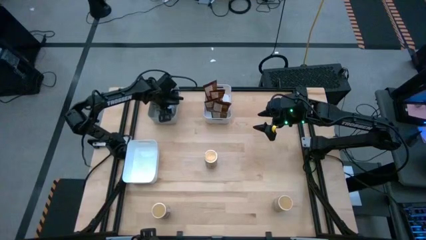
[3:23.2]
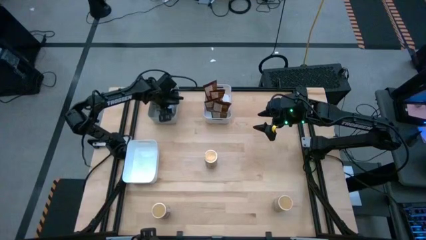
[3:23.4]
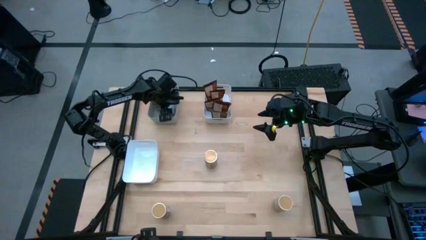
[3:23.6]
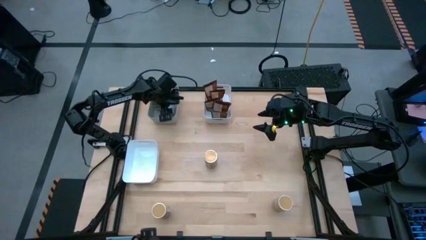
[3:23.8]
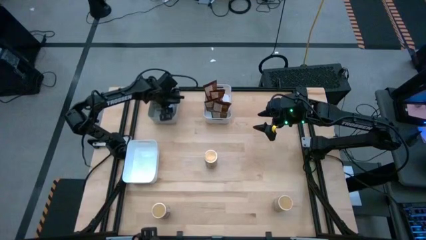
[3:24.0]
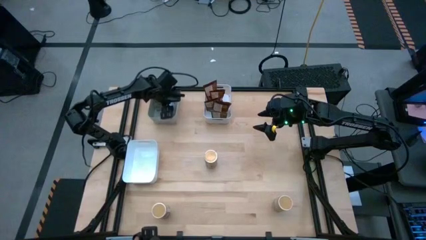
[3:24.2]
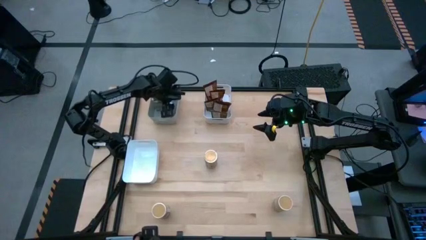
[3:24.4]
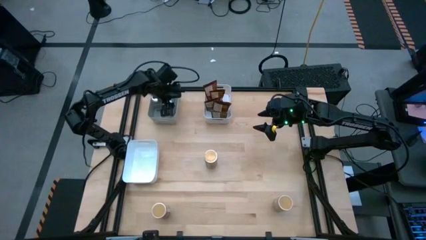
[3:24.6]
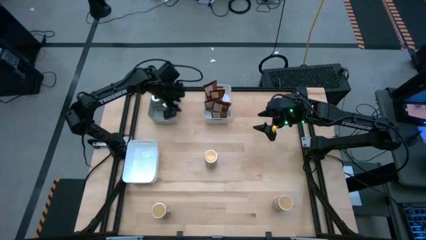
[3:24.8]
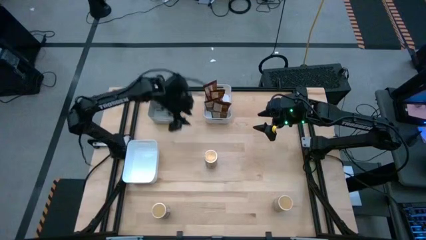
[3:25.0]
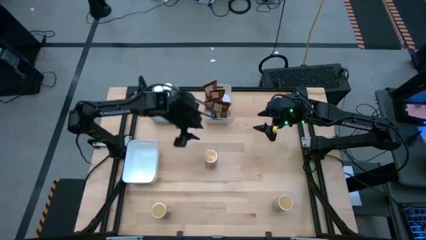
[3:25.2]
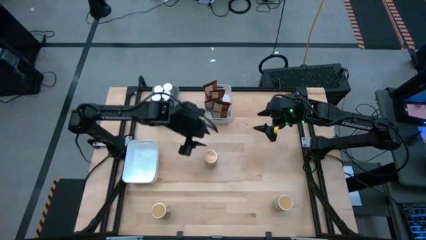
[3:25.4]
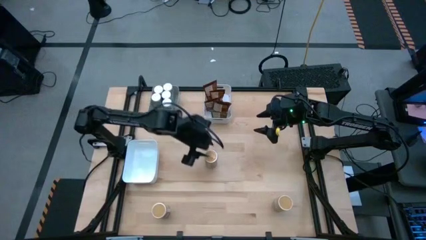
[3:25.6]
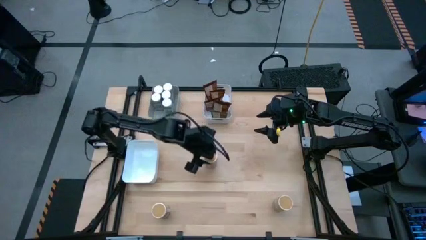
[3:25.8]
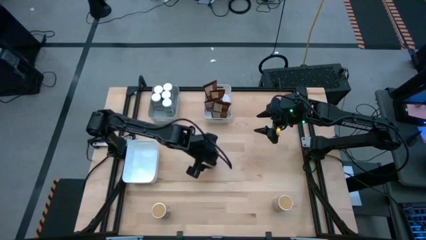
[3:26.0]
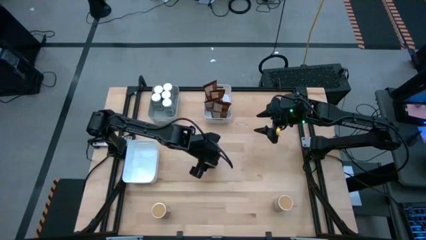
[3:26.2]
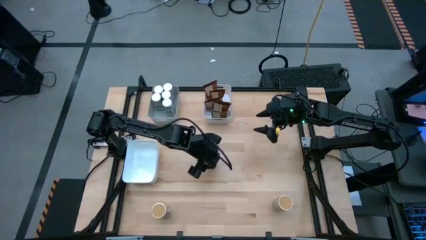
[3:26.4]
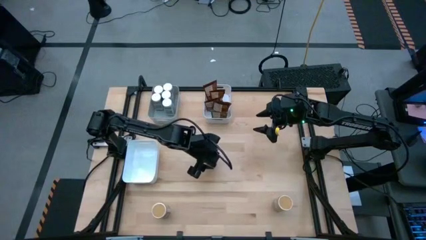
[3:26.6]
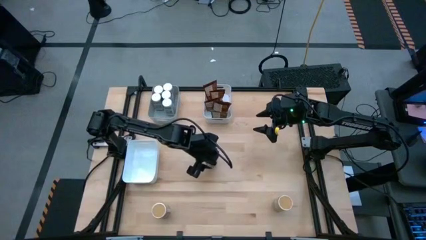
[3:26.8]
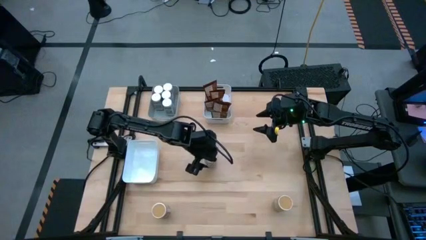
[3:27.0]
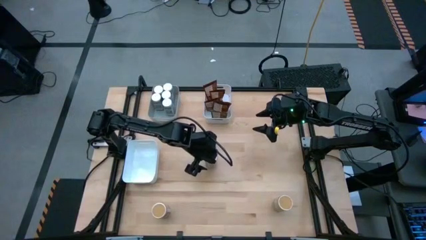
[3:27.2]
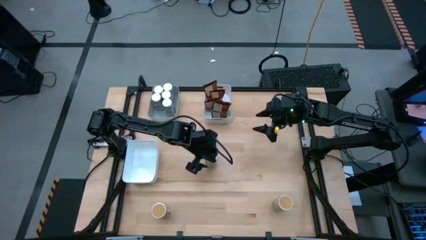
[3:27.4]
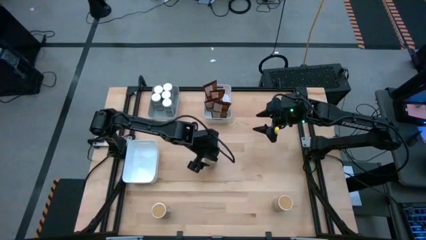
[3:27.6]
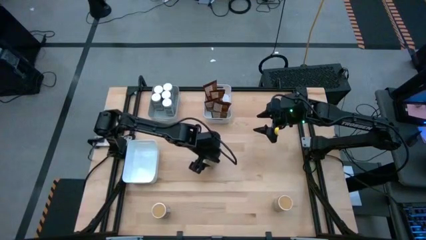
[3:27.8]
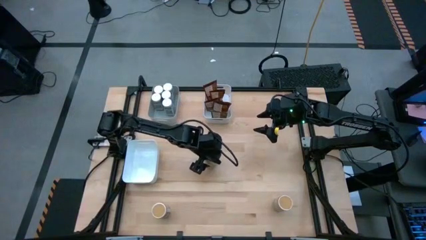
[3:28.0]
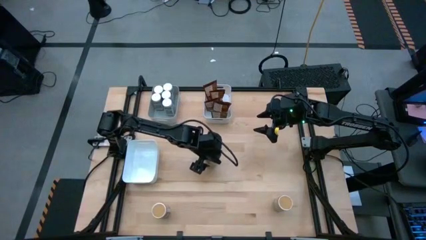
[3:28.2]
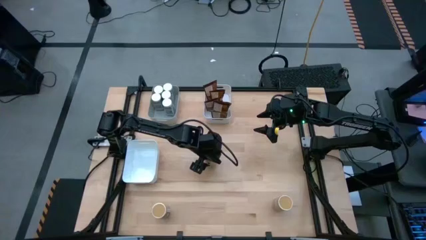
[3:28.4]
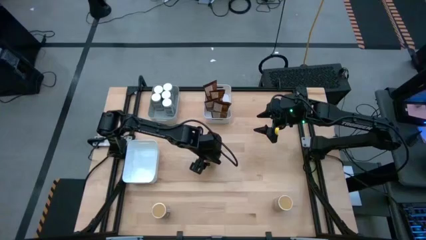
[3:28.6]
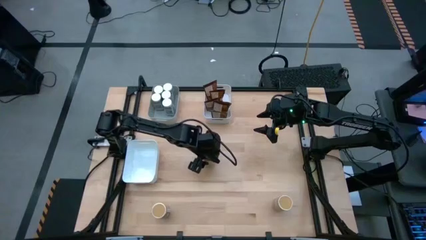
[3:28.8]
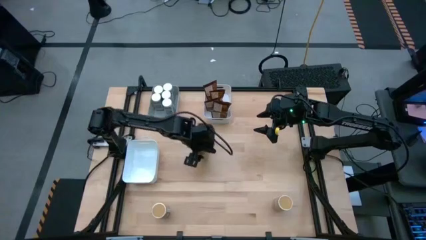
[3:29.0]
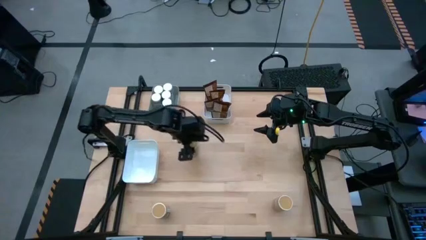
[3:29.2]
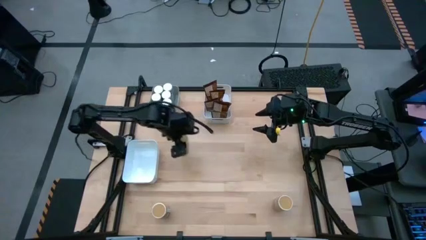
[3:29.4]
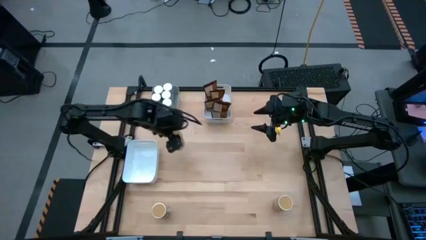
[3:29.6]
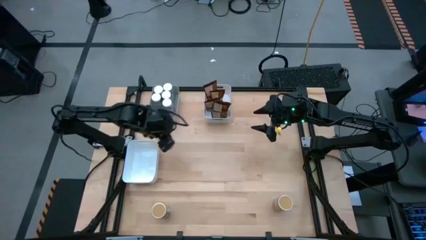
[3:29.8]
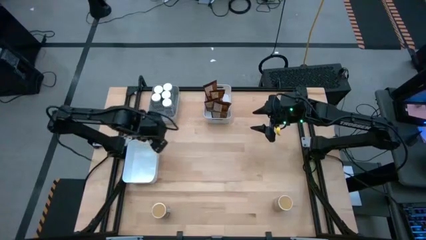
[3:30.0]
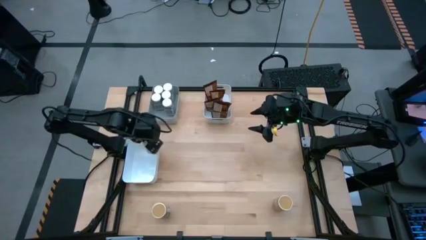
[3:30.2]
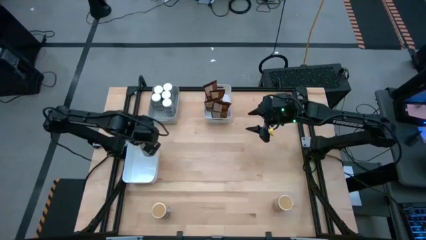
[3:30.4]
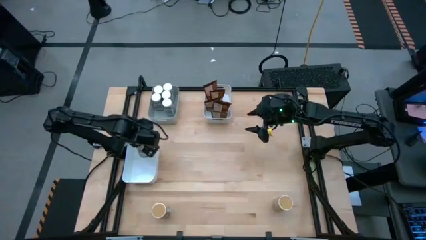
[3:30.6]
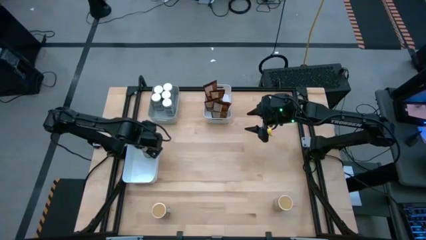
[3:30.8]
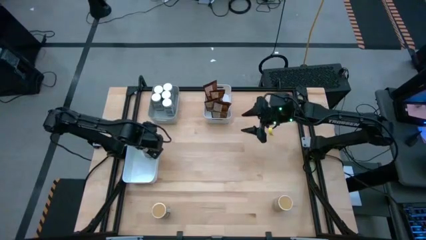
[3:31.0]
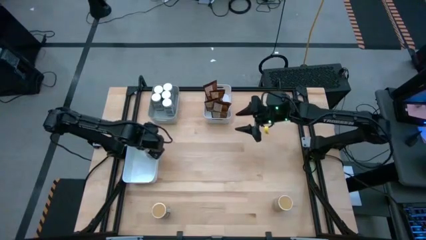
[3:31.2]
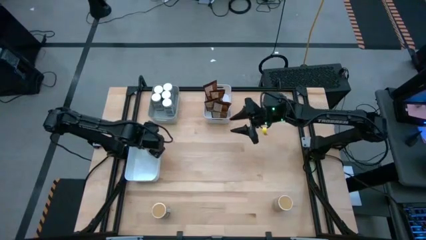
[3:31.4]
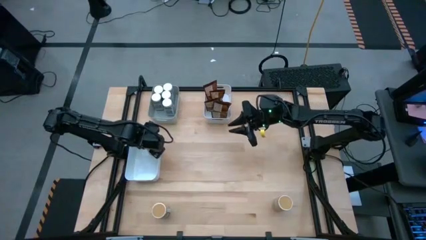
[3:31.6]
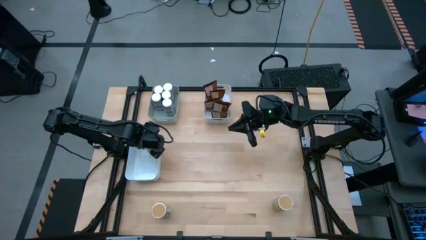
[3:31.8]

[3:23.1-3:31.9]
Task: Sort spices by type
Put the top gold seasoning bottle into the bottom white bin

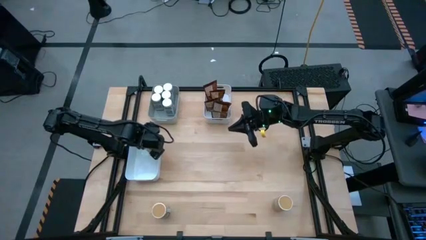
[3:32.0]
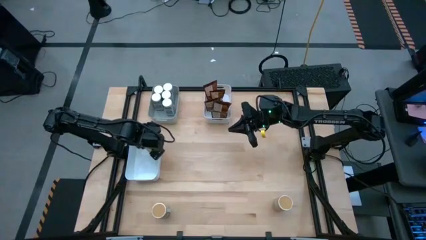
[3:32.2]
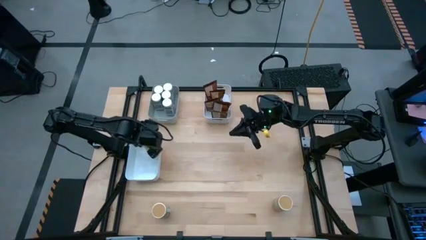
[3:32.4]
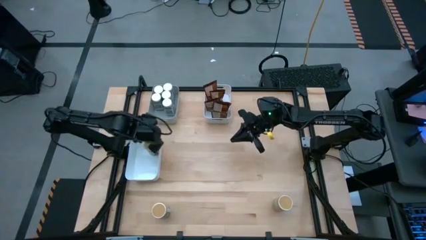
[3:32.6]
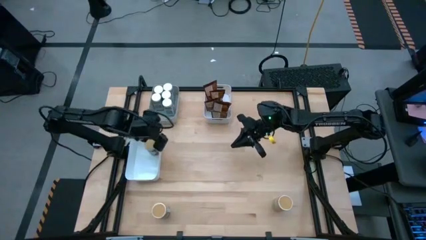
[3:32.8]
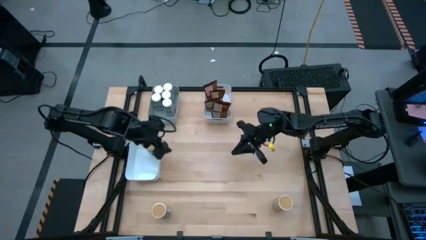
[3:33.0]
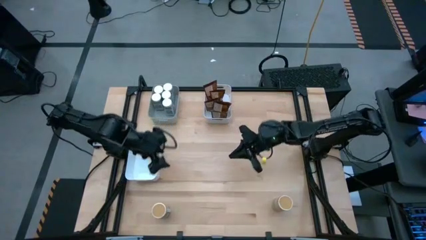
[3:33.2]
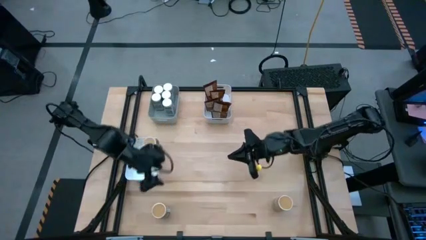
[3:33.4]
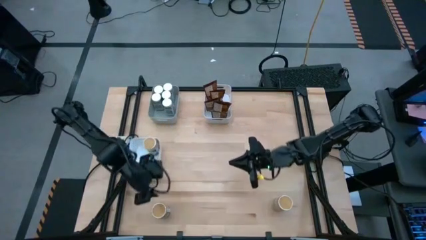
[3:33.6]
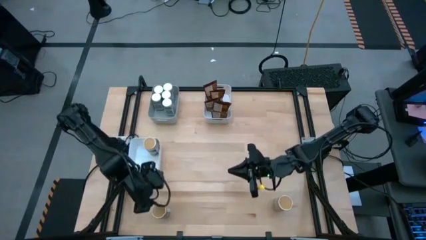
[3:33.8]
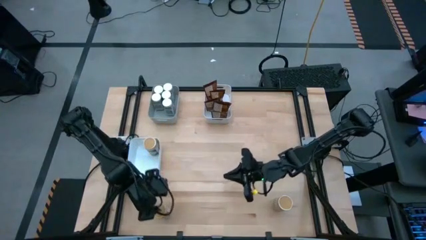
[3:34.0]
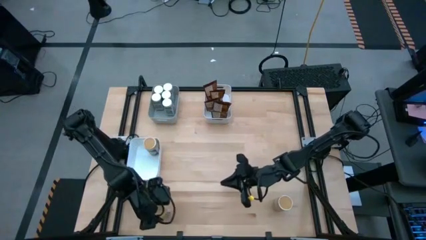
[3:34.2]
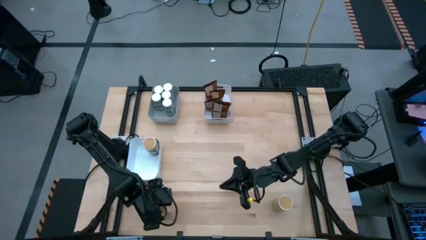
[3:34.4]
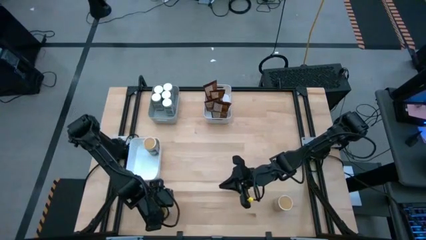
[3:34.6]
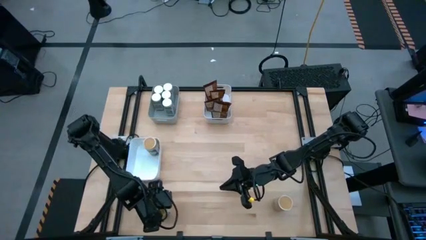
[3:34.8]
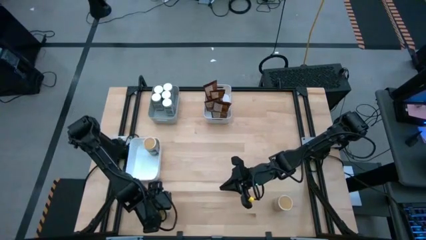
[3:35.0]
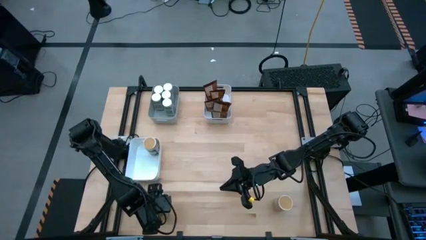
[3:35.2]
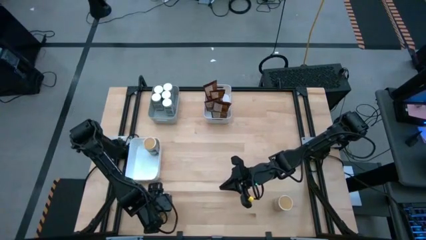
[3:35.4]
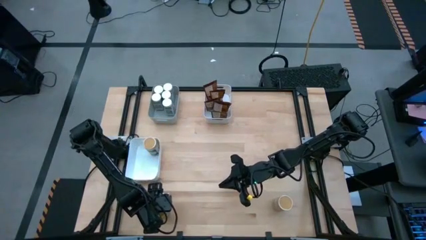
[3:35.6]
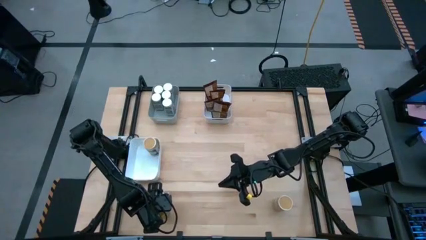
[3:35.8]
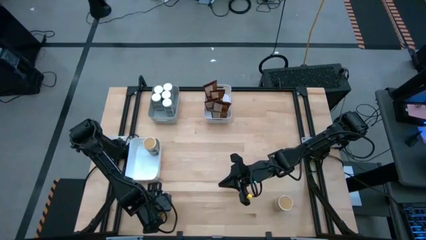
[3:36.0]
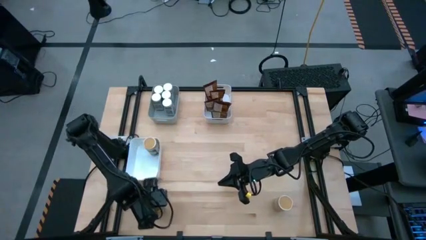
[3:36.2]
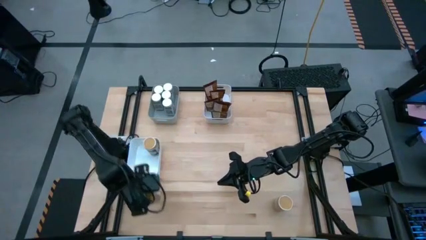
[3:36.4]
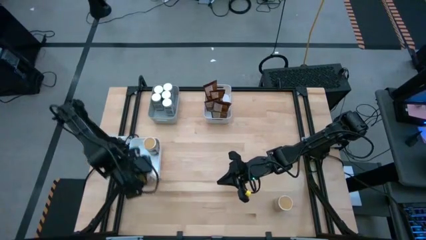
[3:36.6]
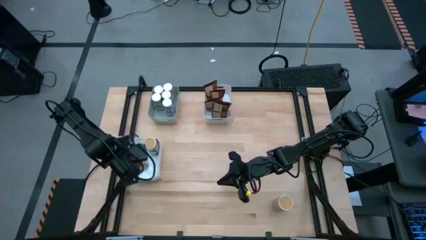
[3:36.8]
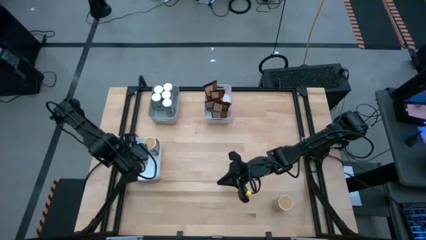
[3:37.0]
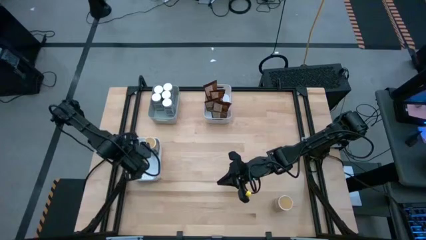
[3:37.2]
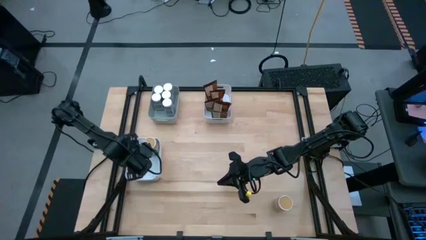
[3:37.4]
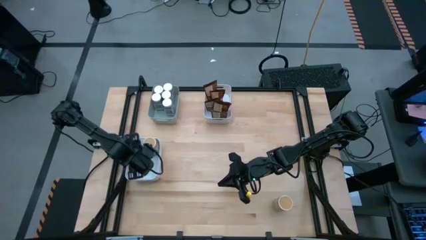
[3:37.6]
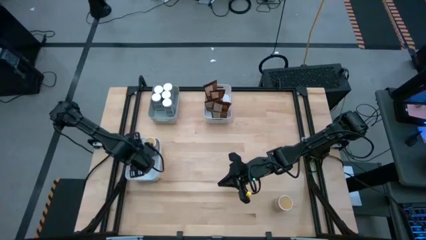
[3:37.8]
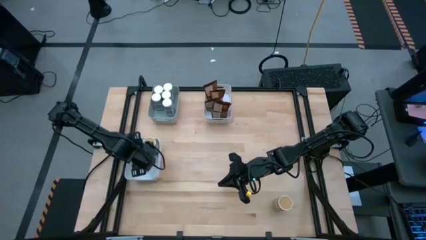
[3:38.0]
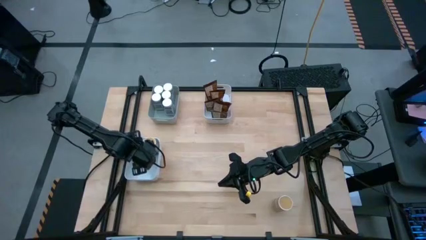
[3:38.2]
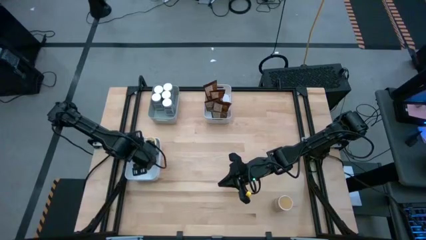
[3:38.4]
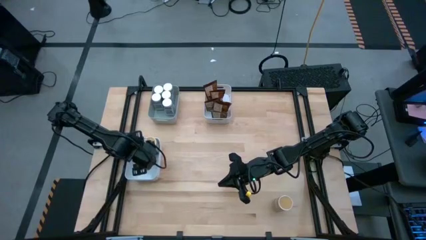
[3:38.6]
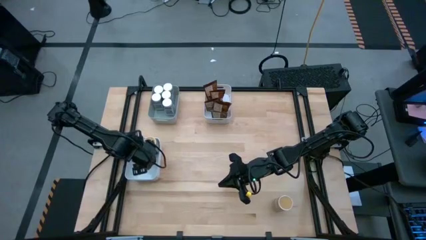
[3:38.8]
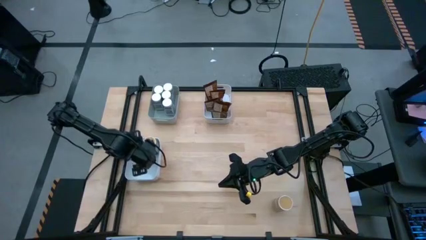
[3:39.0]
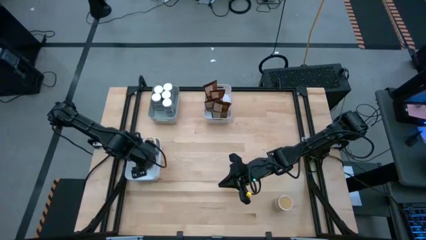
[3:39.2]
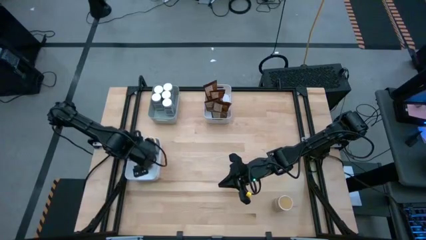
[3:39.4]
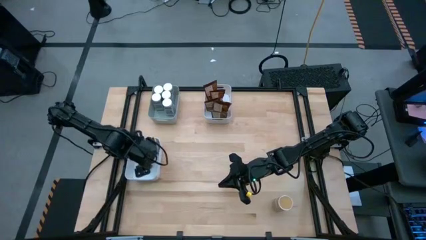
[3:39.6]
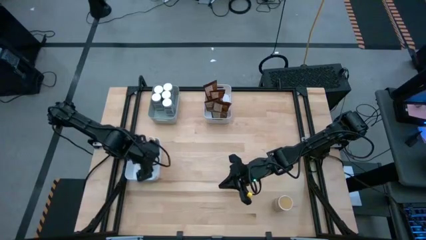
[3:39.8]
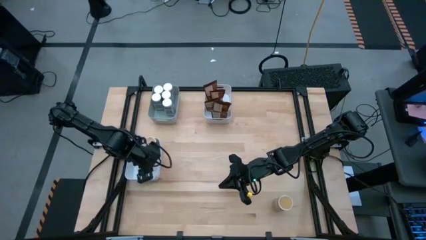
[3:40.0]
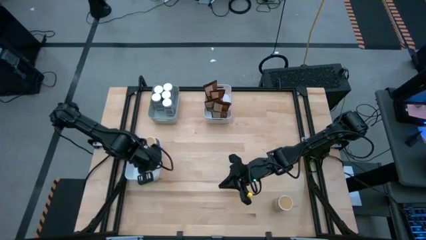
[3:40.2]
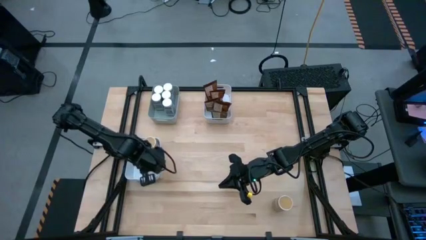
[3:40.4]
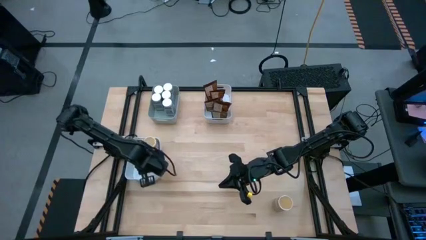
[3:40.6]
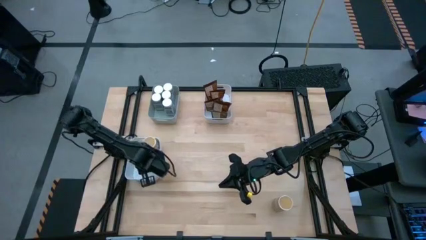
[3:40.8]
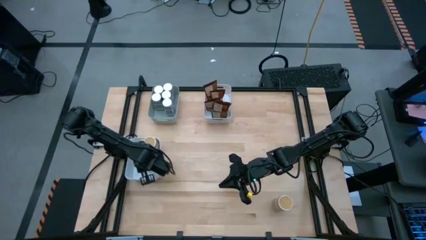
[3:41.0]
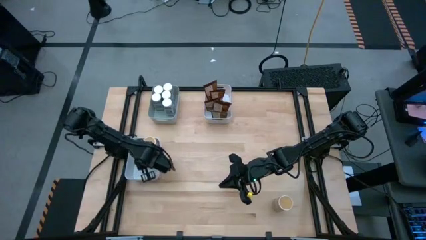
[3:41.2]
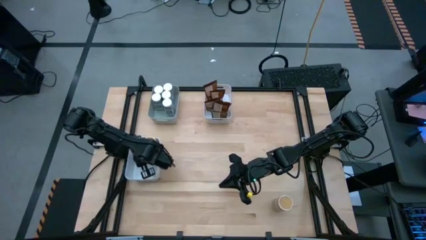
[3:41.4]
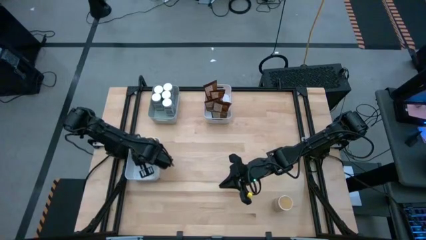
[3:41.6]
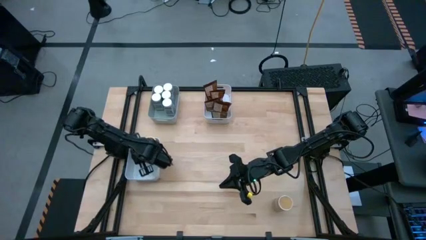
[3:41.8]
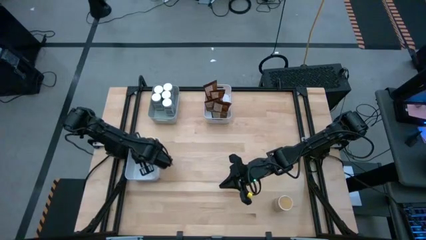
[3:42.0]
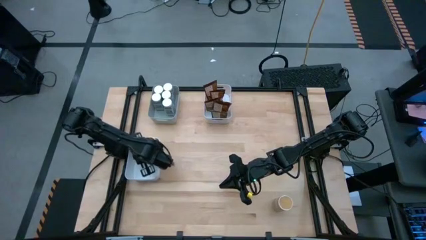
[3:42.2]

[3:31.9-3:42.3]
Put the left gold seasoning bottle into the bottom white bin
